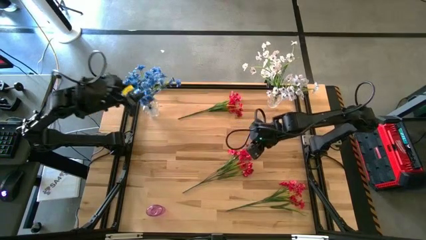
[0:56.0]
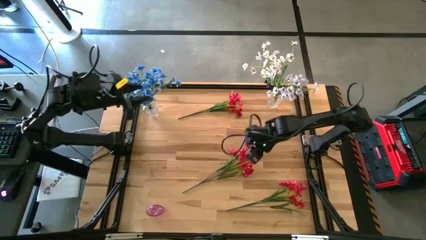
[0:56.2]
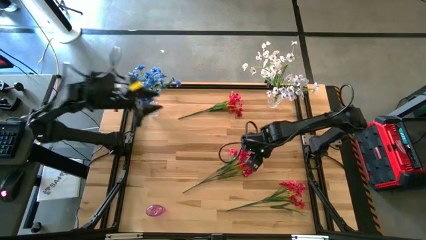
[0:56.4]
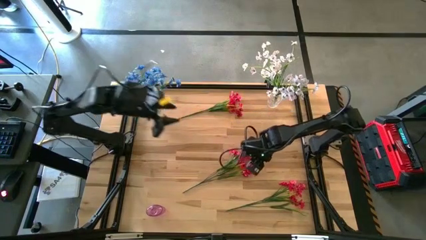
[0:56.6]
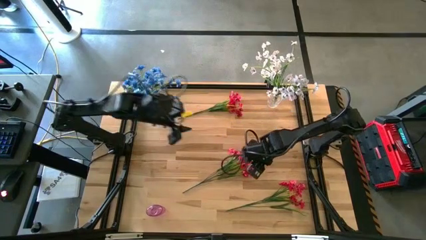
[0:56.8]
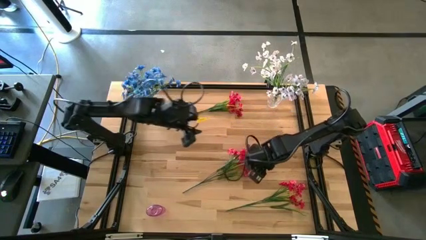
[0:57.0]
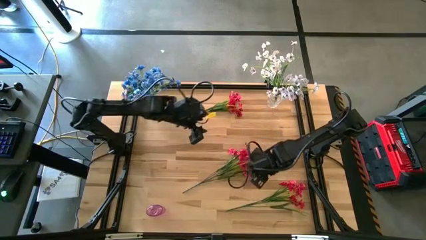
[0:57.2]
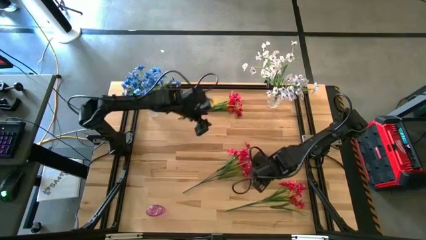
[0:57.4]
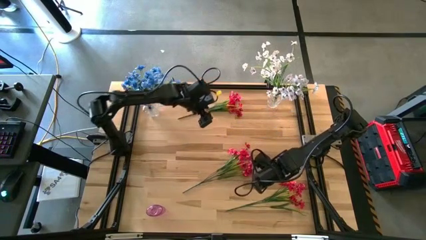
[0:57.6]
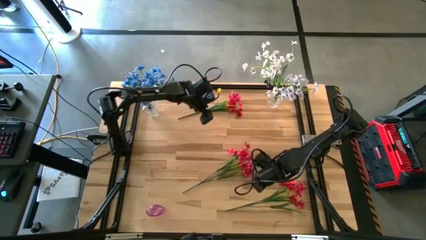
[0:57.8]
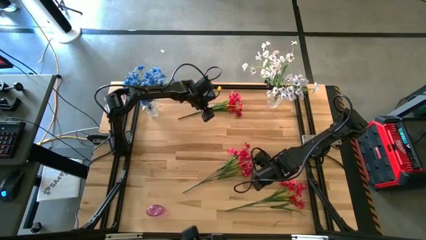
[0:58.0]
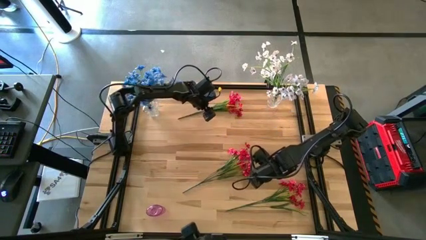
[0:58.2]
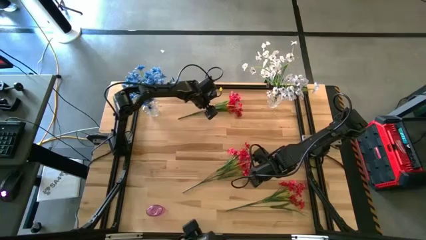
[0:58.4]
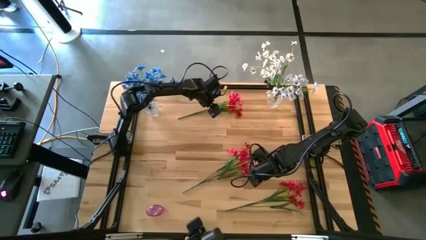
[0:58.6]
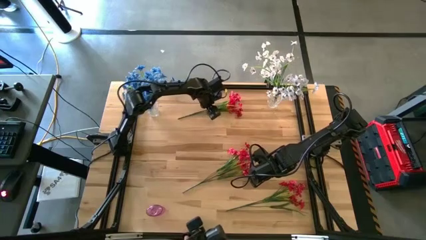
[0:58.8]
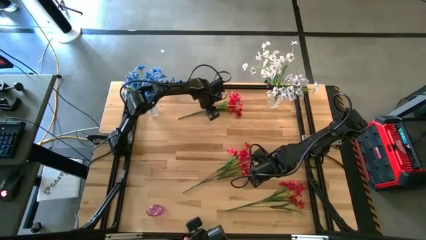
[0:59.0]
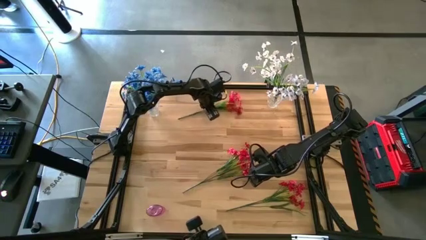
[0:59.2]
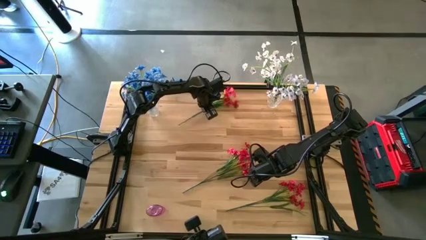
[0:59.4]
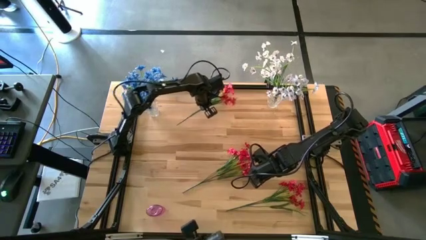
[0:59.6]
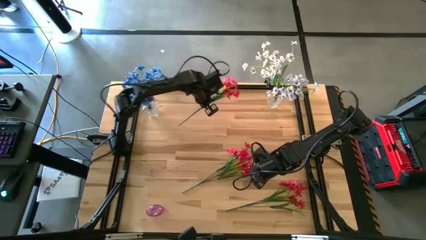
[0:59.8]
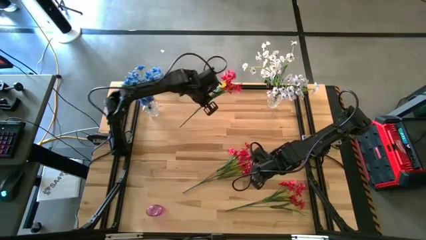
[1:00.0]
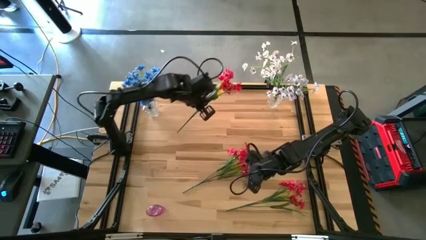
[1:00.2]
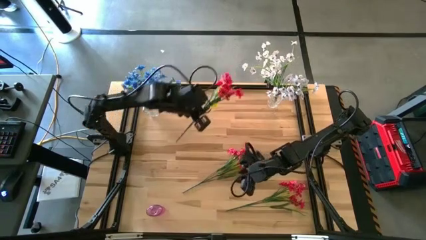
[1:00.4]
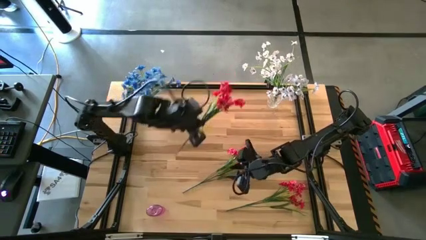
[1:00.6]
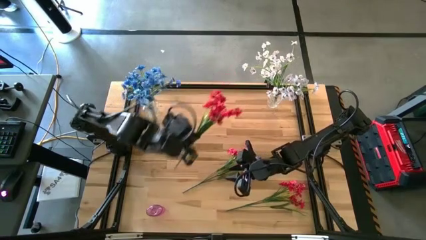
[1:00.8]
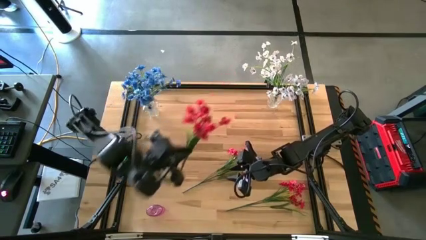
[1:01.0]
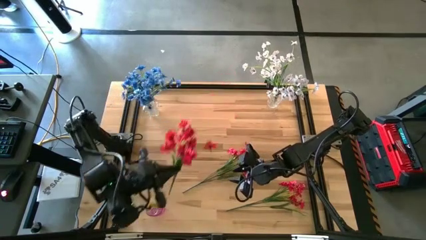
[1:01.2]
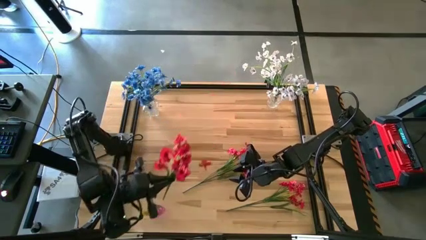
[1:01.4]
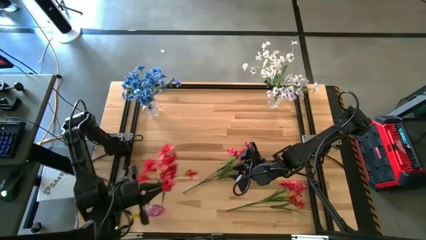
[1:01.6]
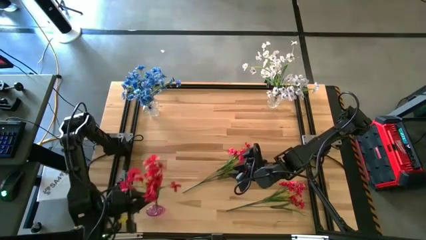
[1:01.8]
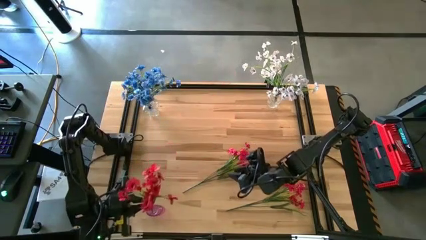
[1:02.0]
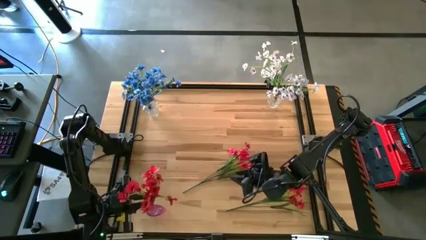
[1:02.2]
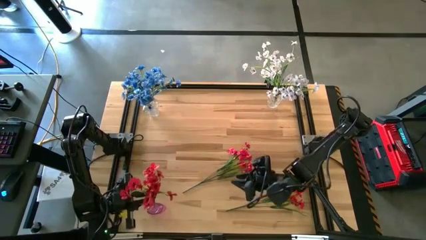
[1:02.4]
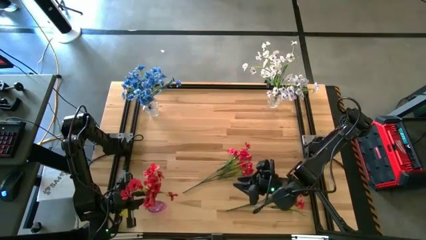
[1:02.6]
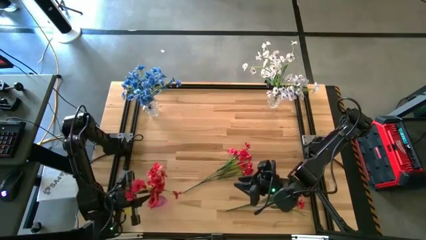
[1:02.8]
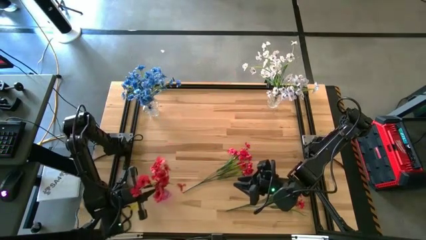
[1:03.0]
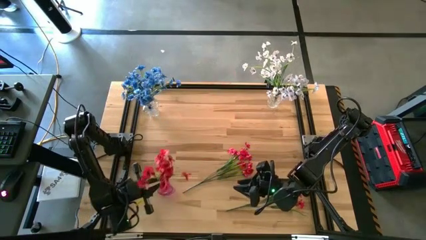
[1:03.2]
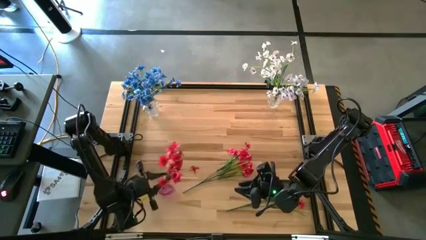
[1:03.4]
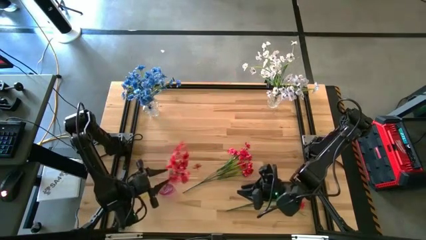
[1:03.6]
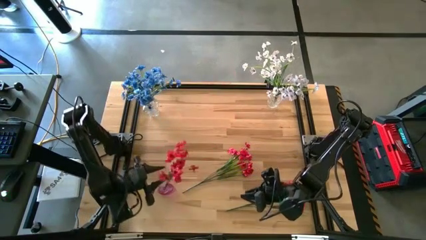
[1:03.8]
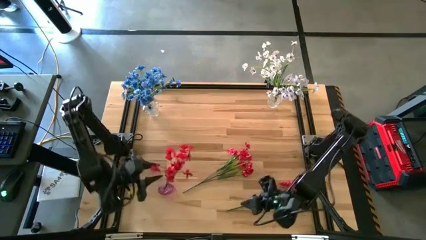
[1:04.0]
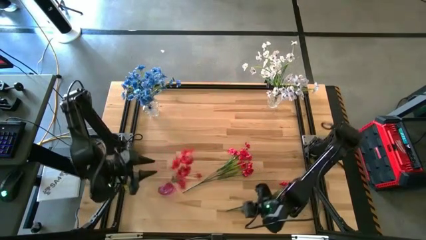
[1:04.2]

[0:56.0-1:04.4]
Task: Sort flowers into vase by color
Put the top red flowers into the pink vase

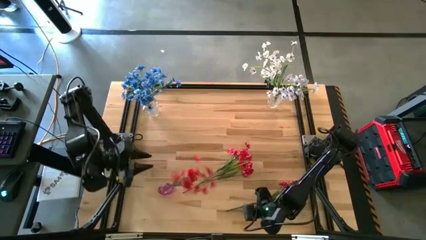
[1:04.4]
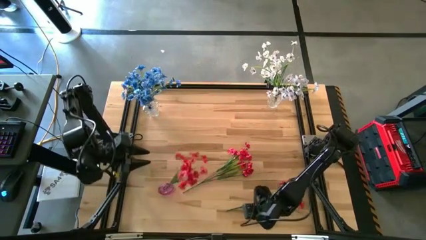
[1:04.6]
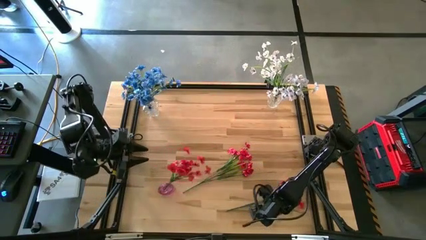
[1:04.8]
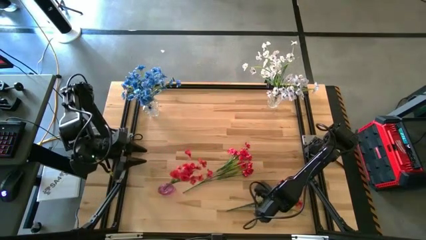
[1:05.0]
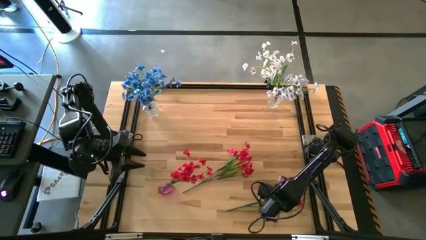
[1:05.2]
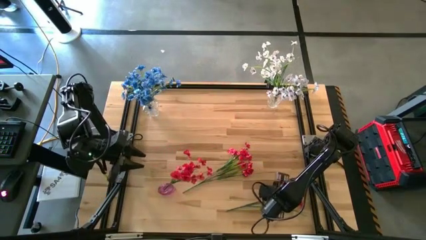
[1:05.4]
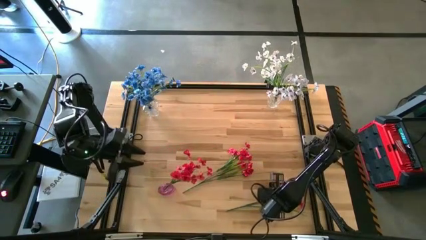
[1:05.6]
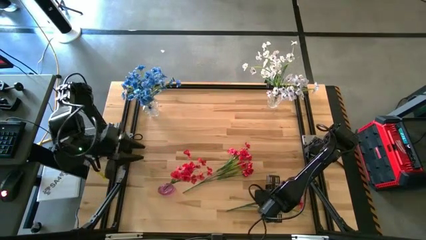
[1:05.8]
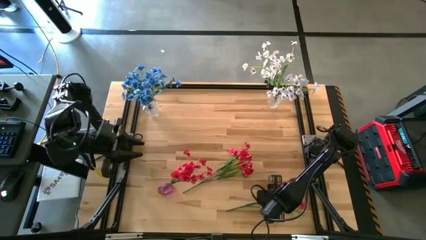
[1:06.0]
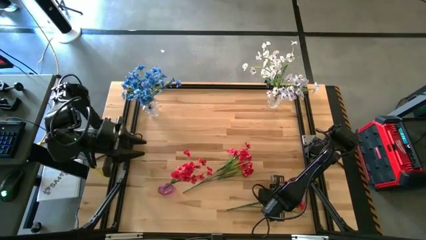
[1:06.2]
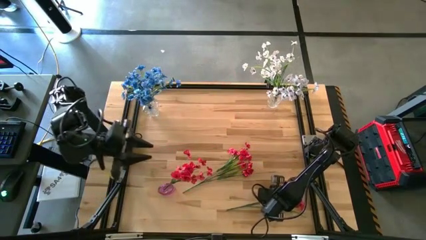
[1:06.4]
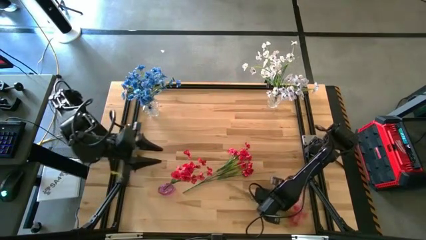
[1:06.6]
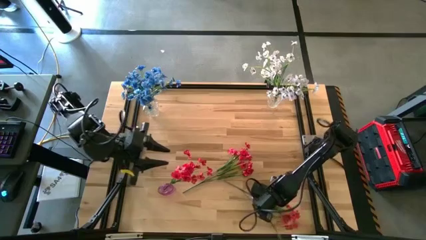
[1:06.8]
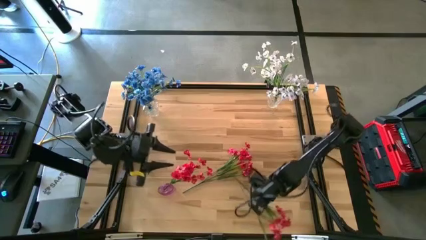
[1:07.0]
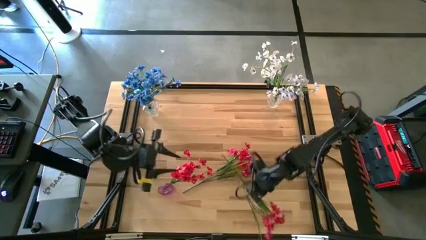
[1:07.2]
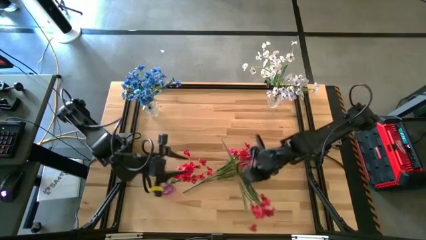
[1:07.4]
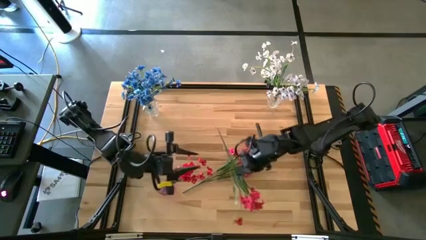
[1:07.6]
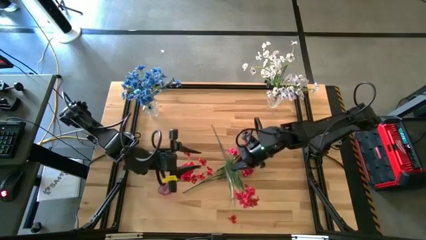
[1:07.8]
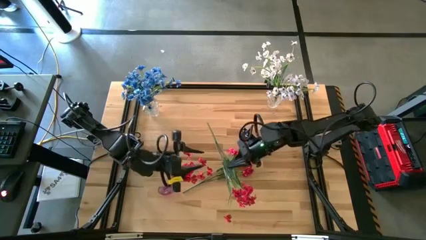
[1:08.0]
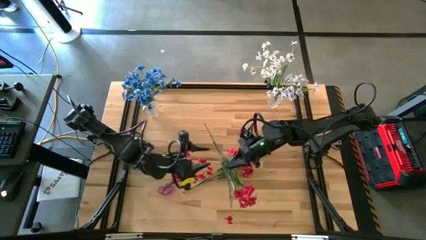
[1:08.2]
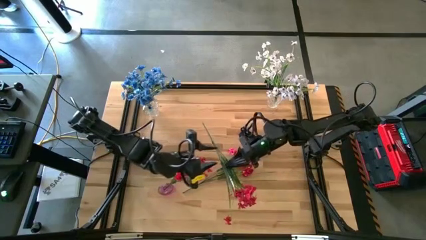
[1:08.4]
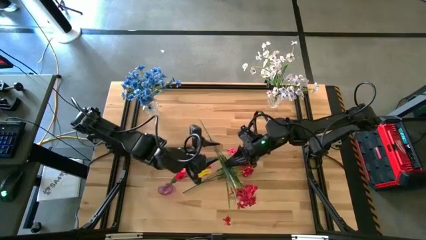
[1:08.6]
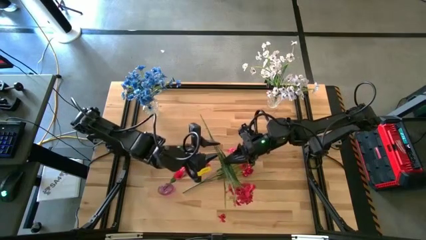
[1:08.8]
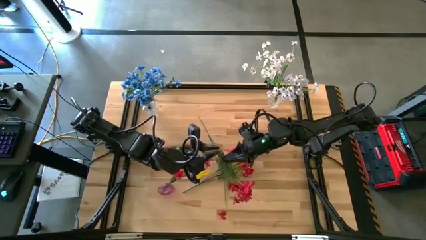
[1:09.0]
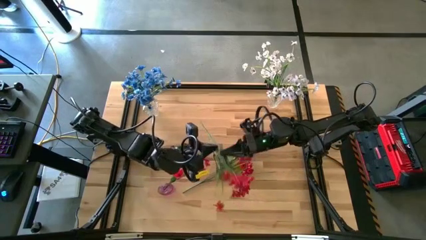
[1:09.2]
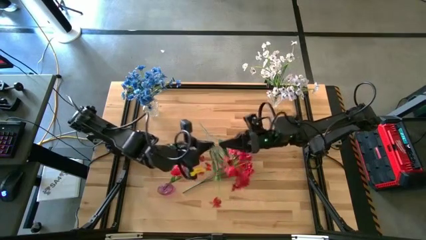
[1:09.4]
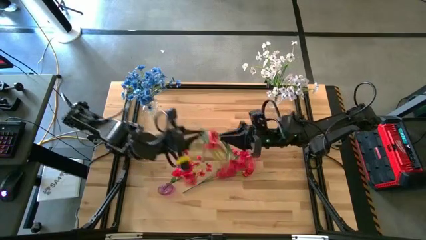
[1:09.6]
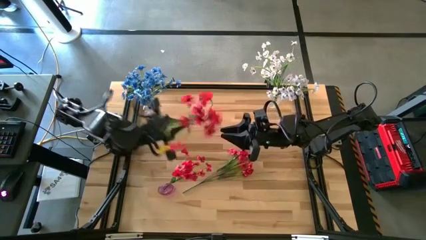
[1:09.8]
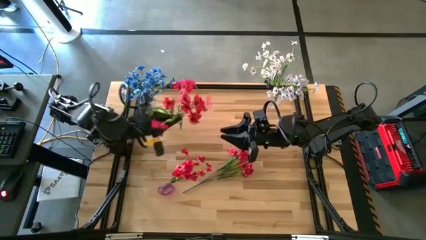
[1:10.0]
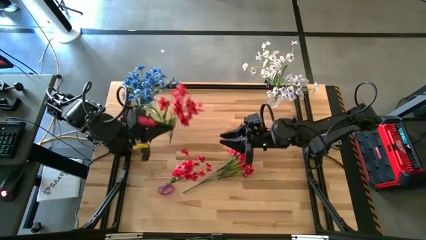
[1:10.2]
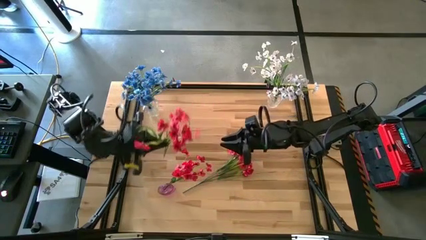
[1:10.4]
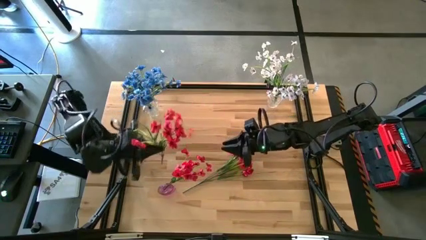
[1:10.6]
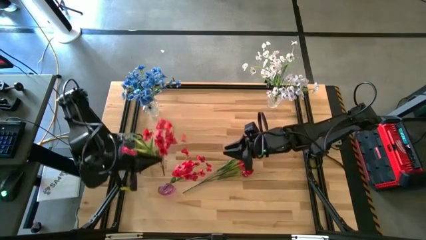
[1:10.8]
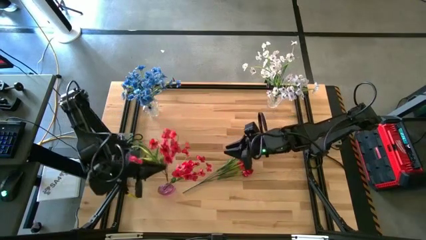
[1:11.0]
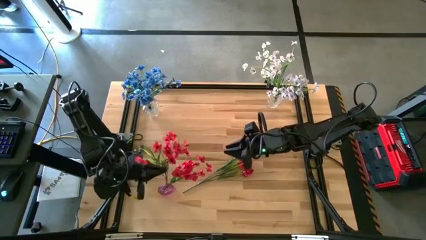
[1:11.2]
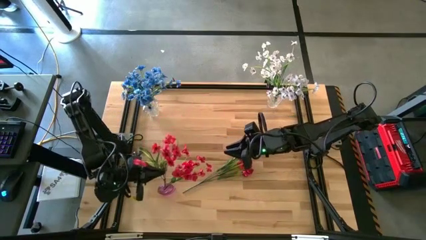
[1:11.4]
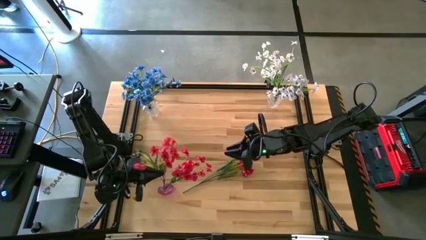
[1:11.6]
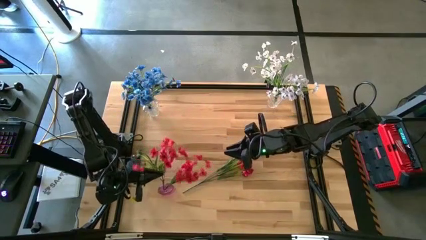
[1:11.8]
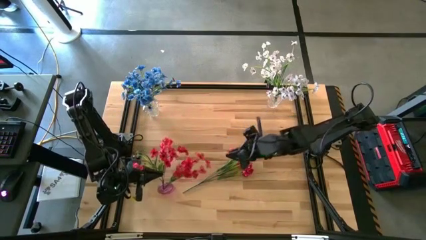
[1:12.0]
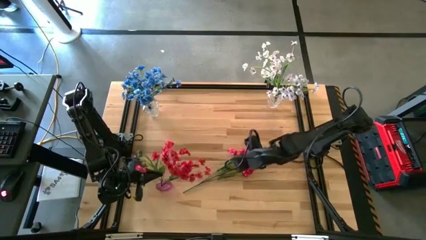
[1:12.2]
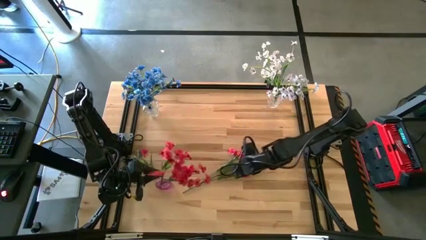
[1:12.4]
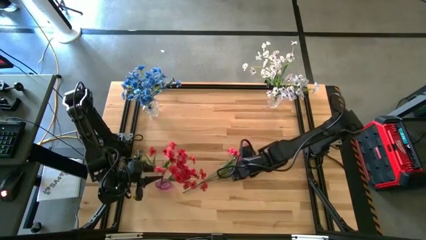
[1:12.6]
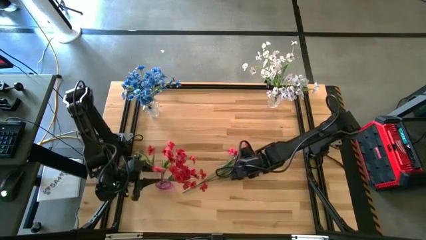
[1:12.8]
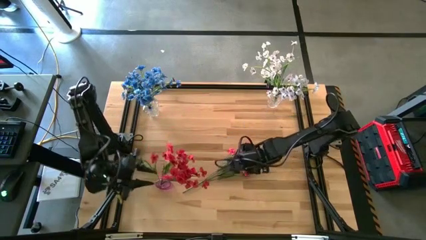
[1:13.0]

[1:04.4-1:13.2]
Put the bottom red flowers into the pink vase
